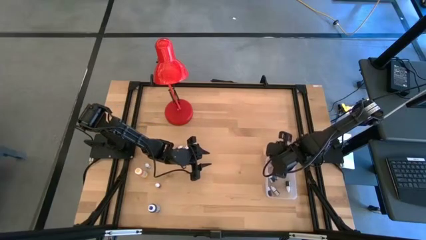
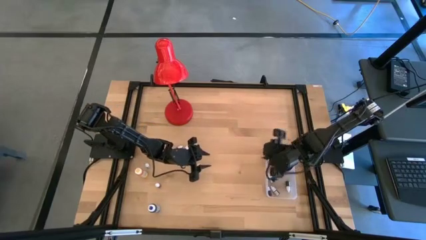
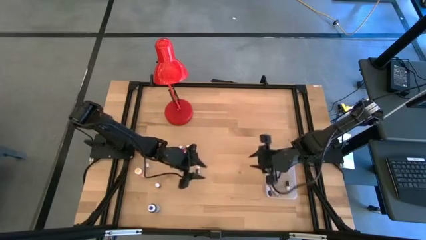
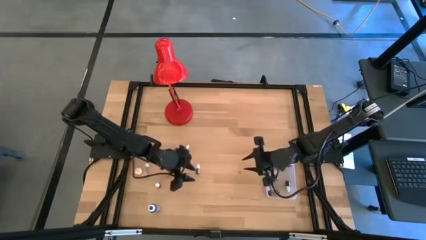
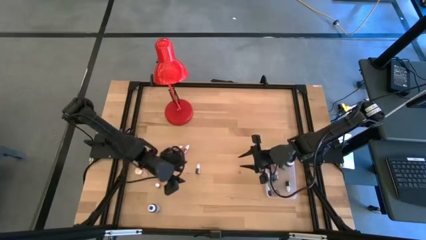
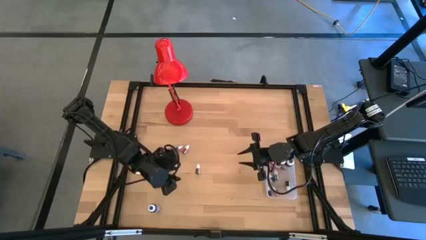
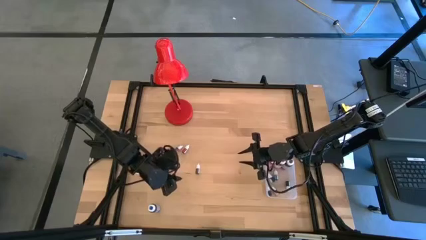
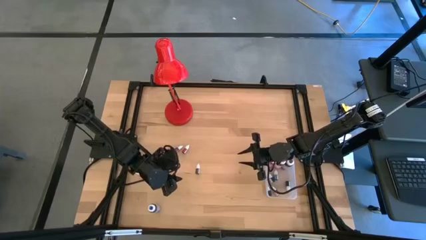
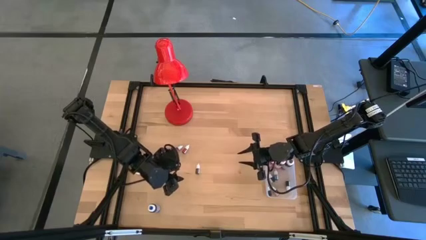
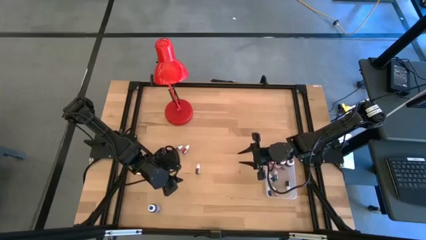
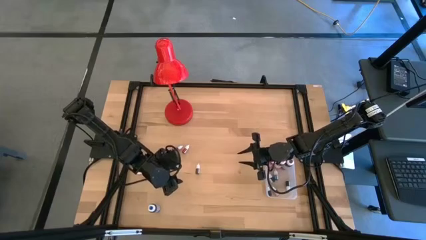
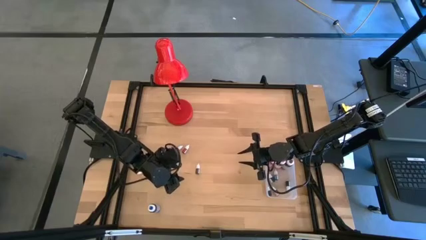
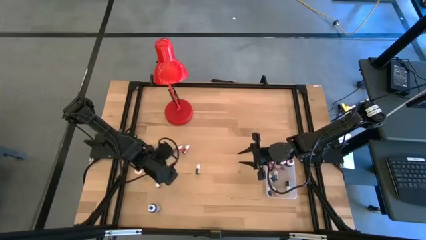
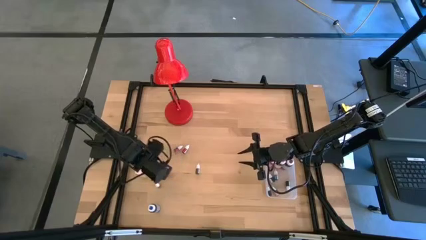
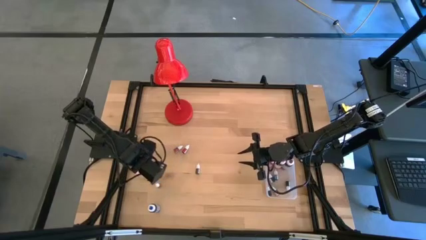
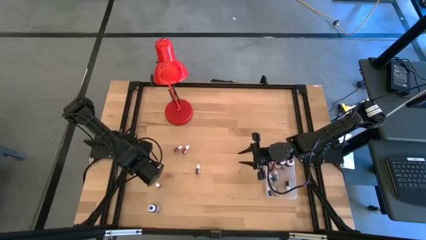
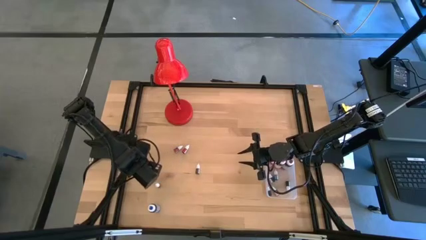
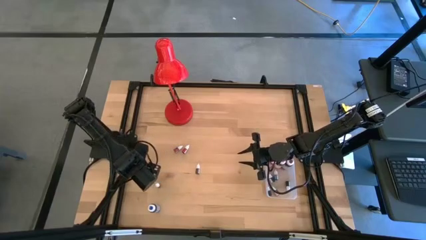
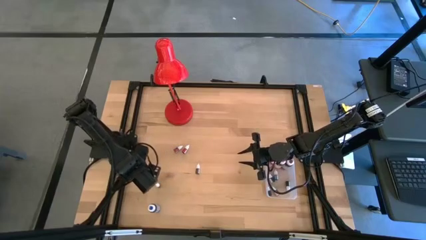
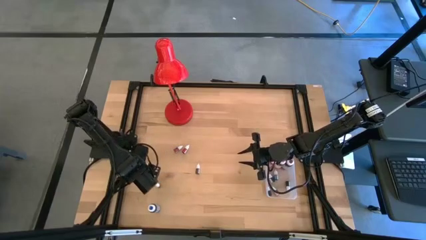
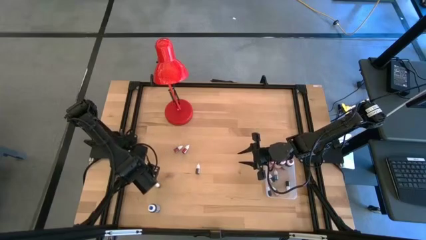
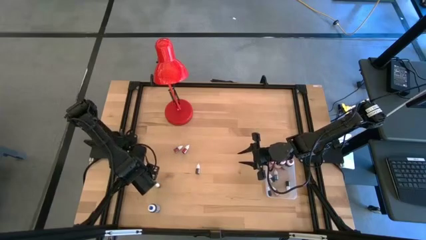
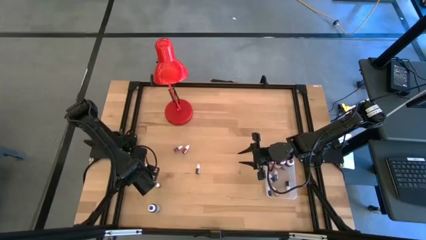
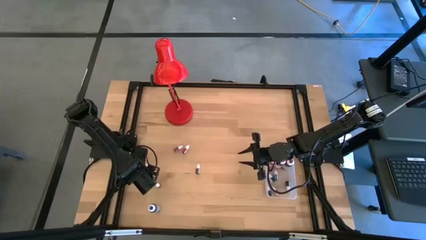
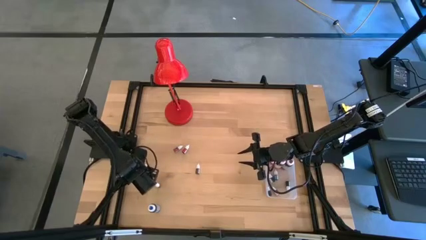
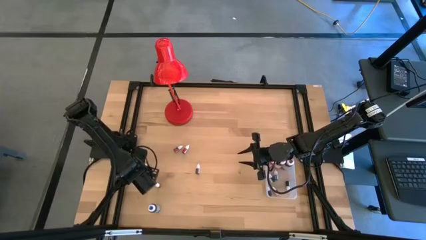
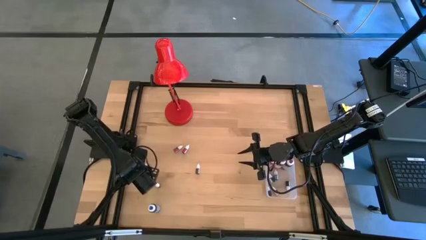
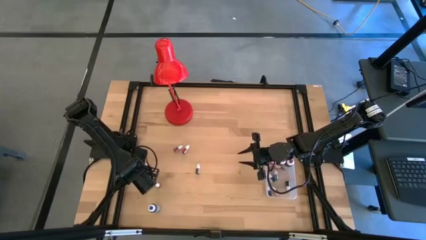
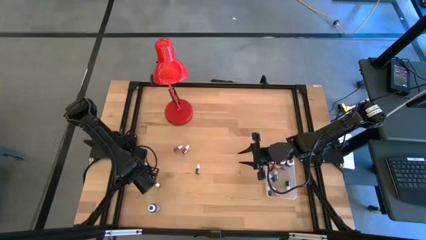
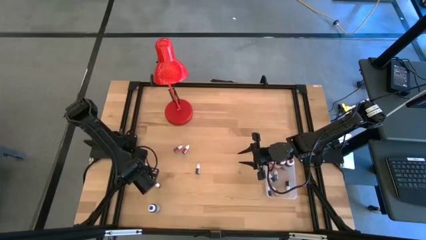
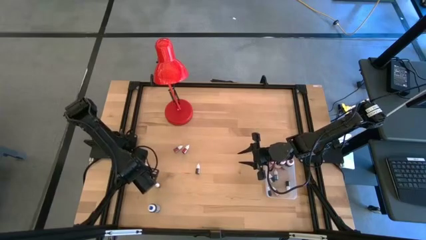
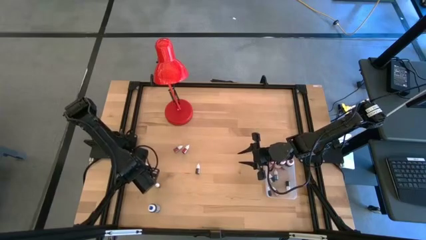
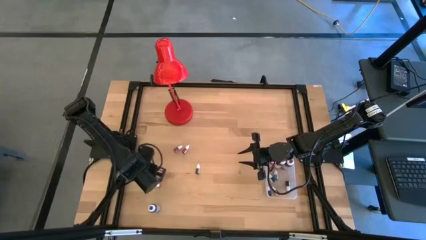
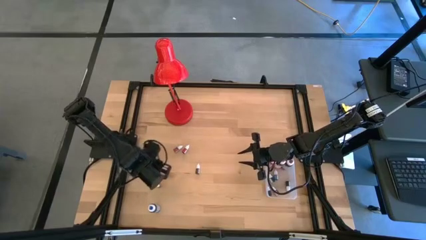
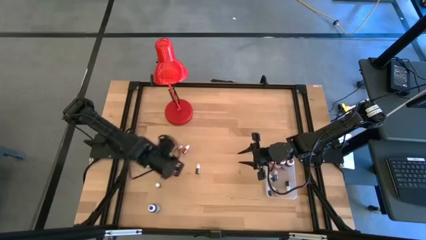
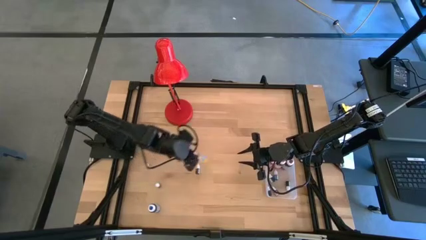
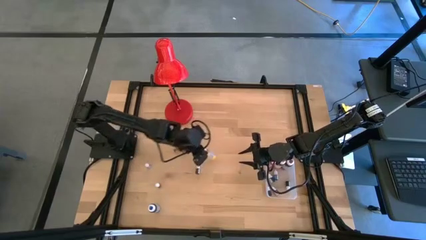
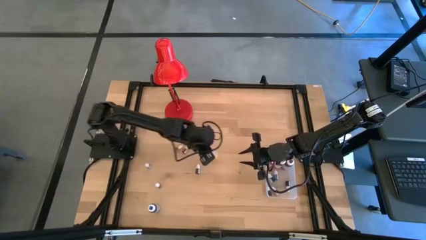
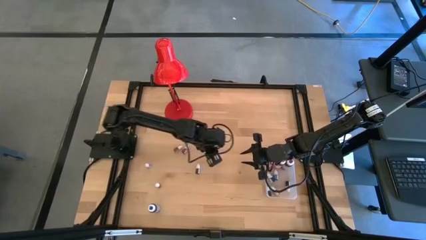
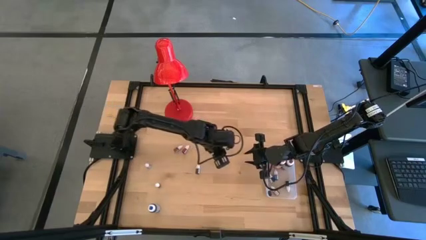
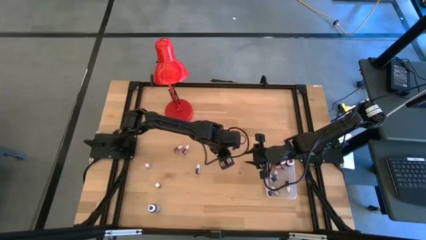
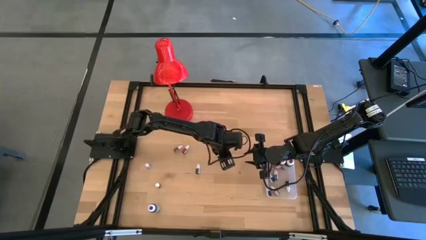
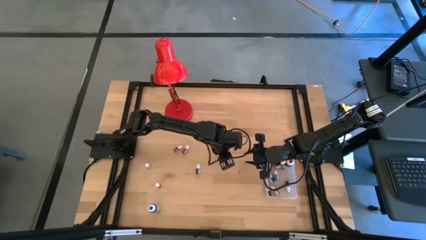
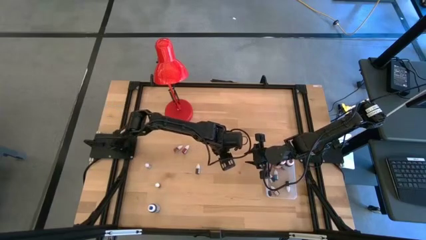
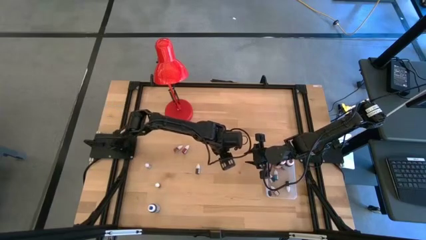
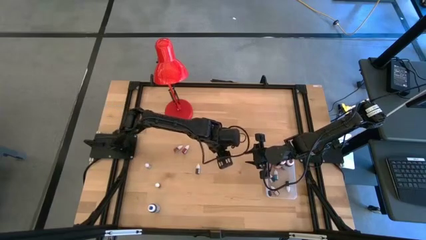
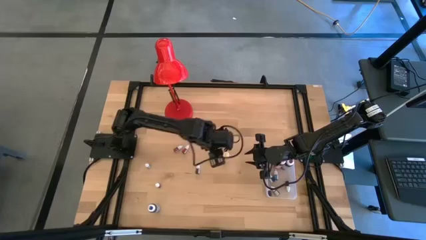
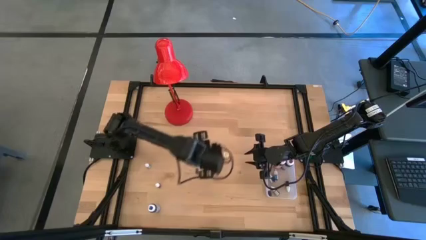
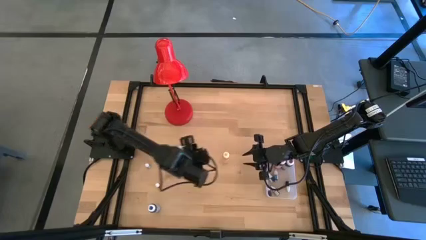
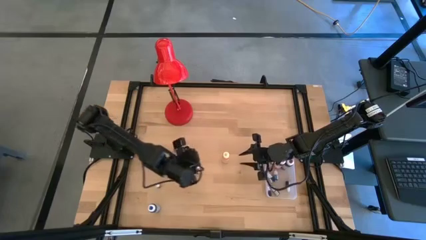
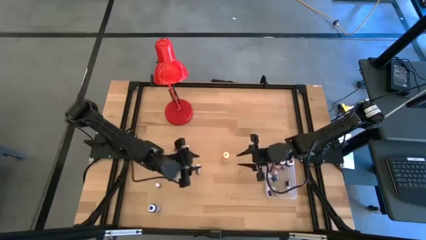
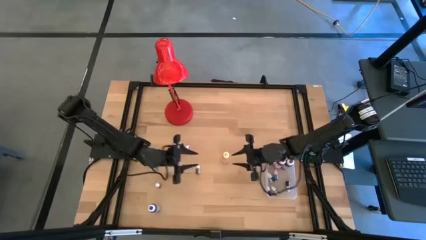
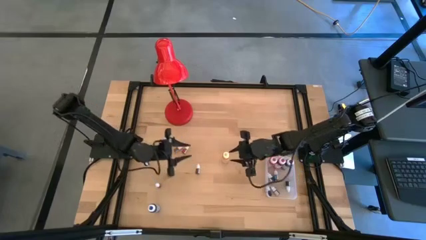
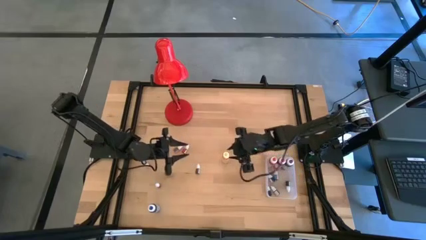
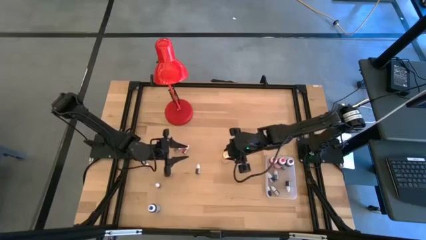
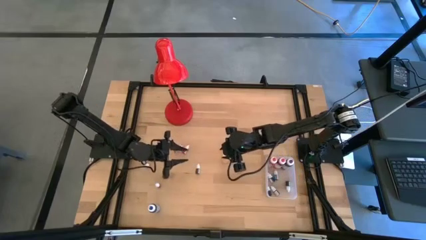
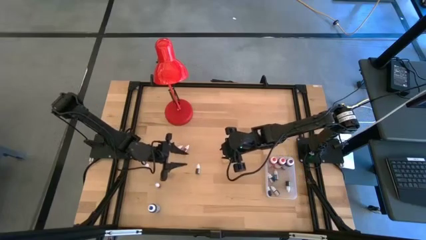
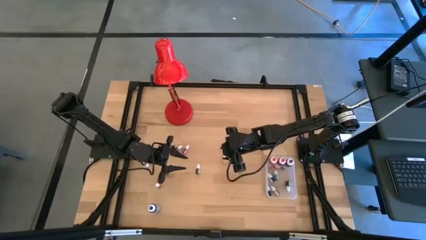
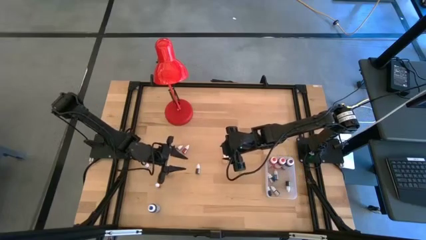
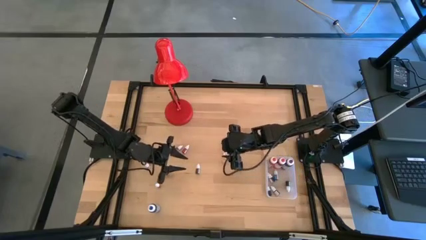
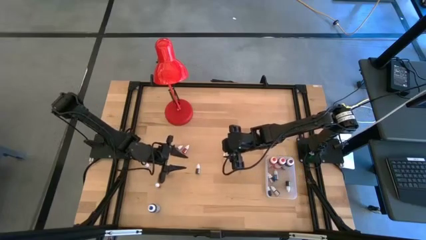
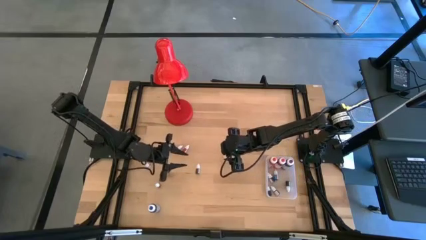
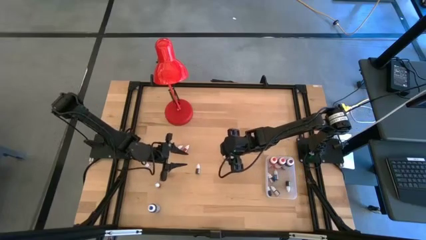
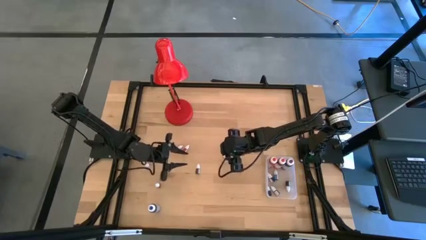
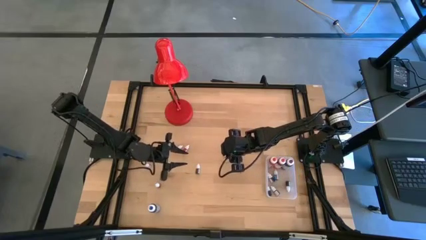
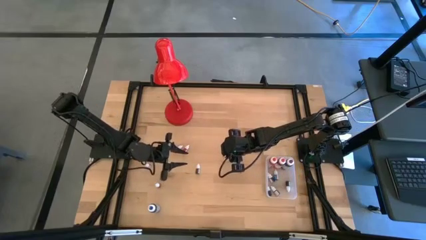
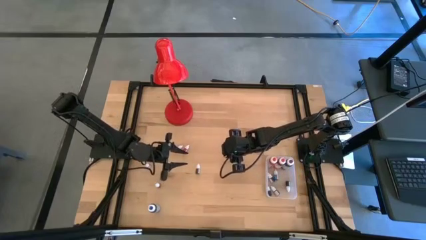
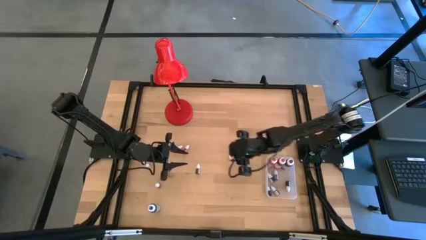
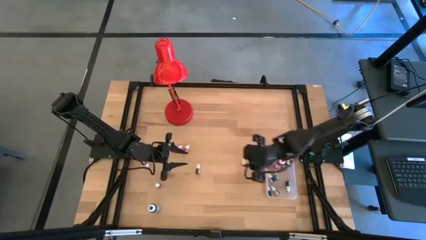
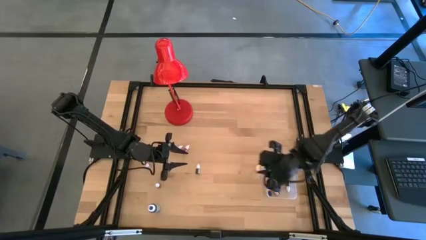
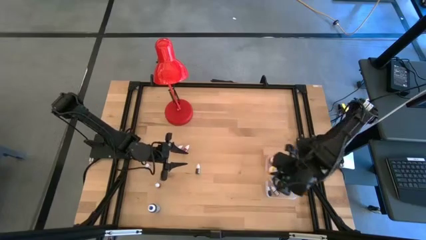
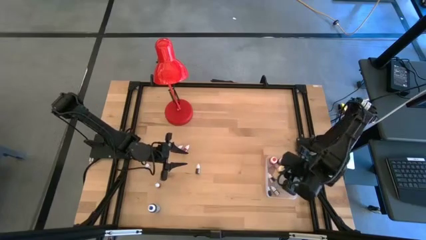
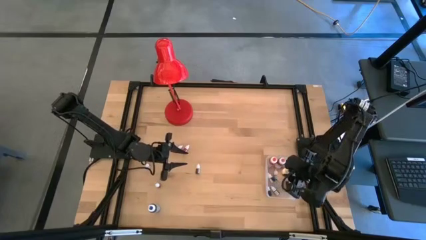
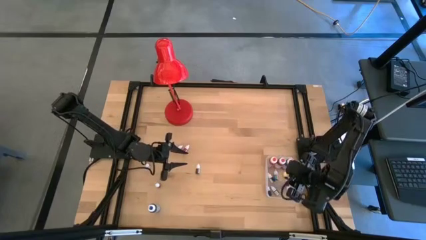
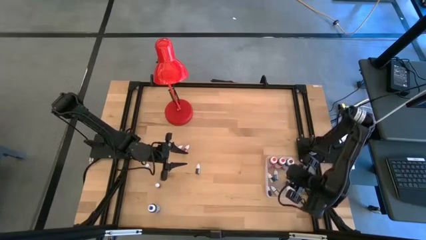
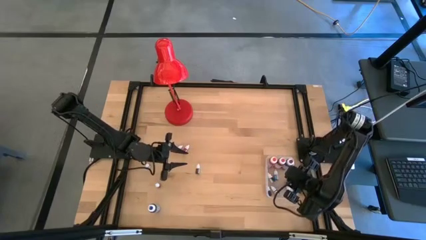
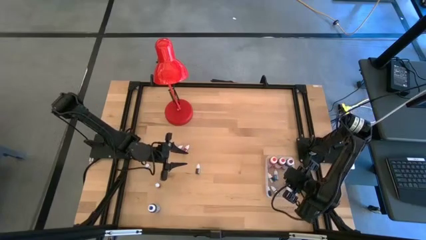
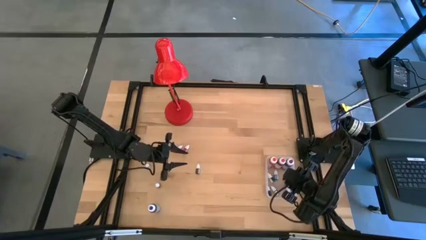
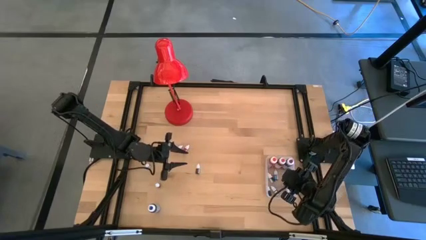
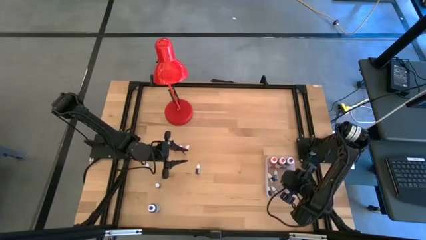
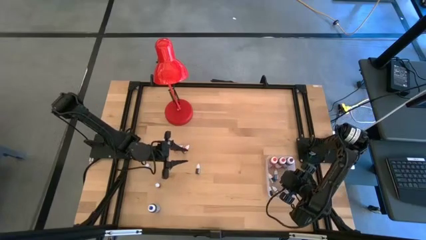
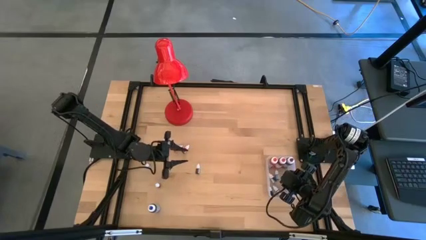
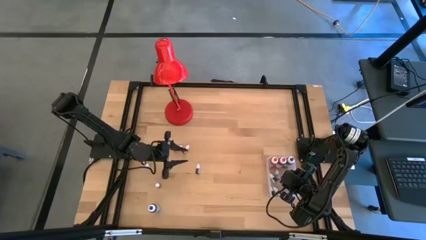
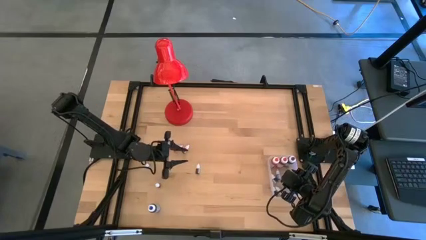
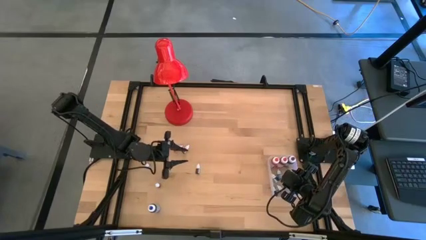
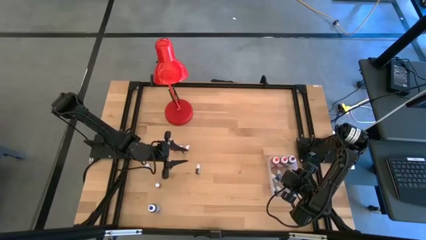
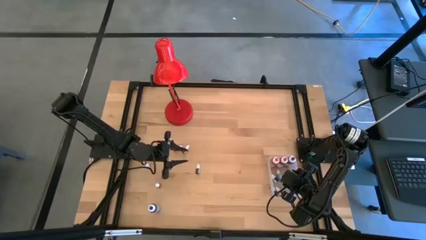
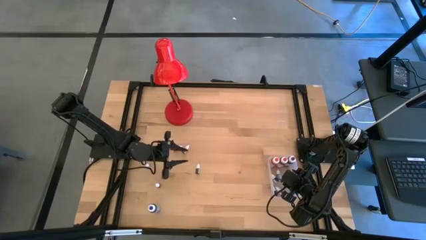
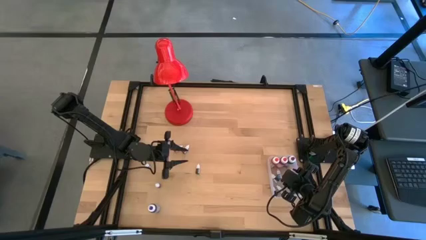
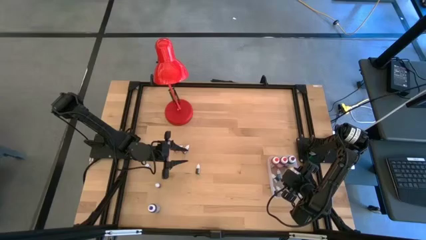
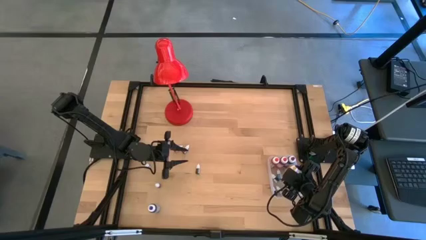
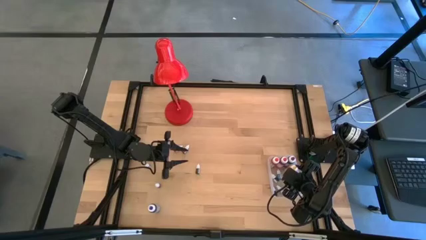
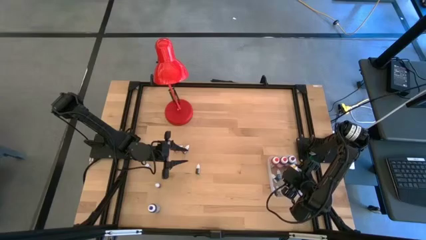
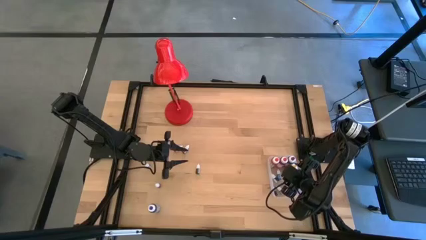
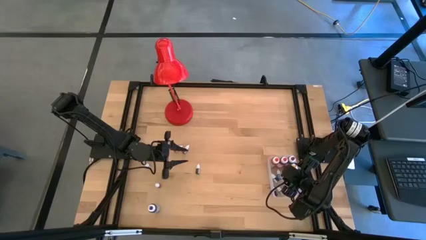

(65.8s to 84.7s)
Task: Pick & Place food coloring
Put the big yellow bottle into the transparent container
